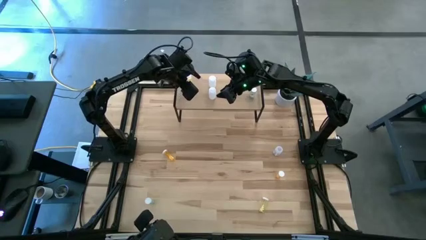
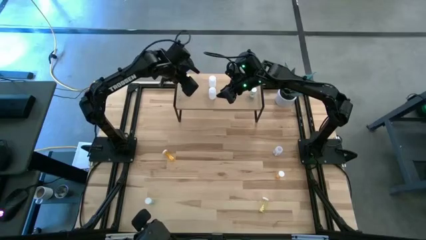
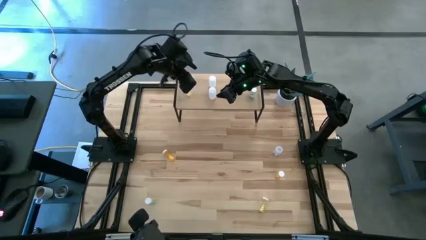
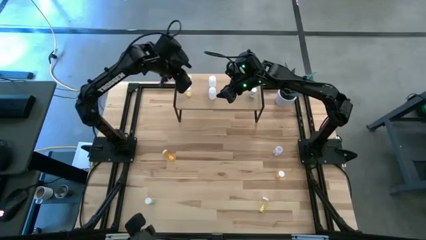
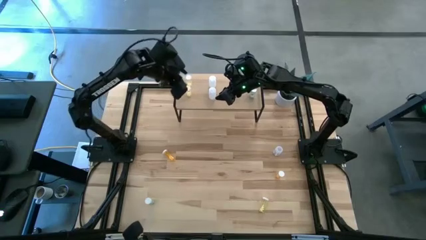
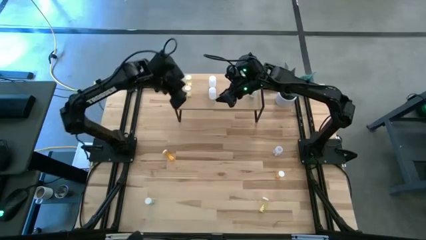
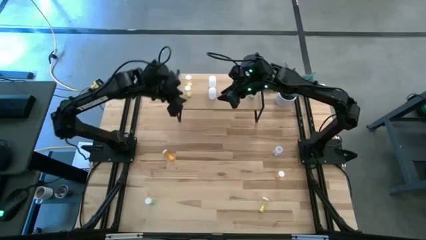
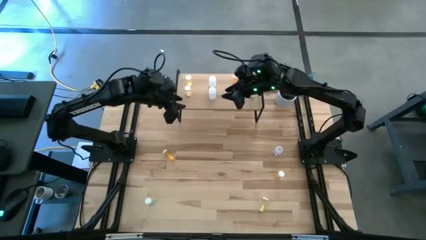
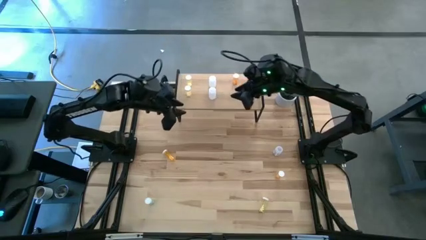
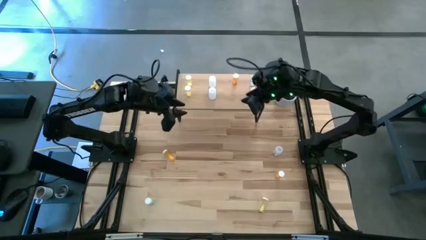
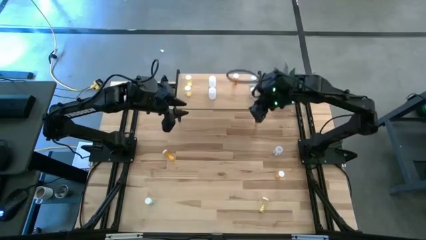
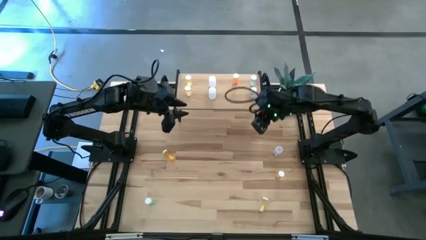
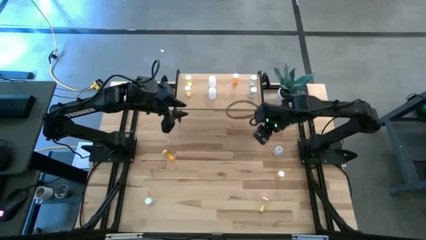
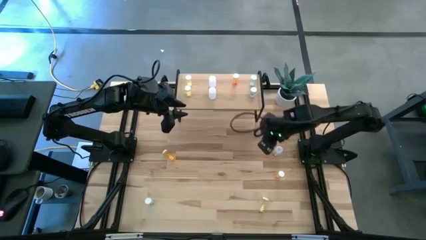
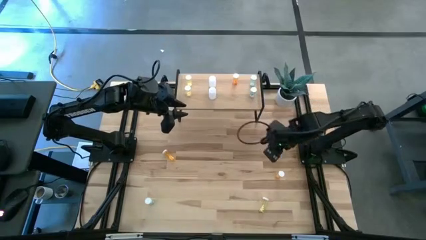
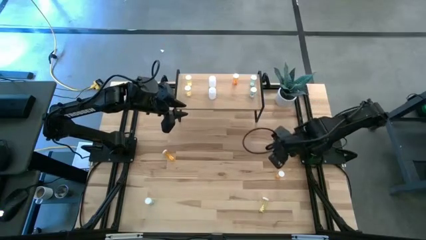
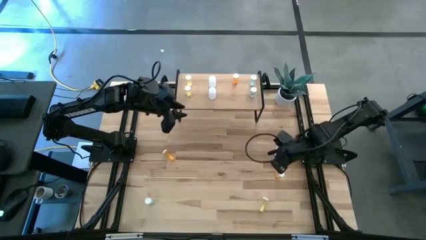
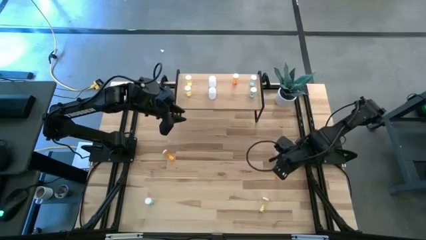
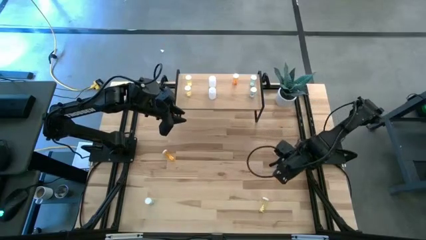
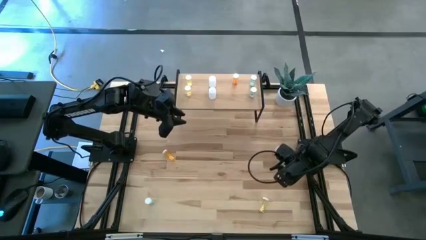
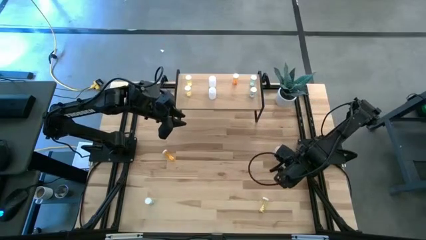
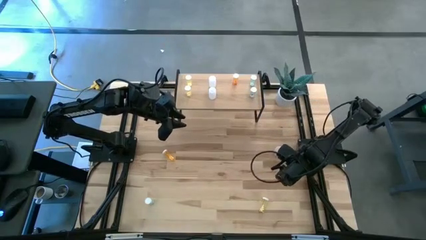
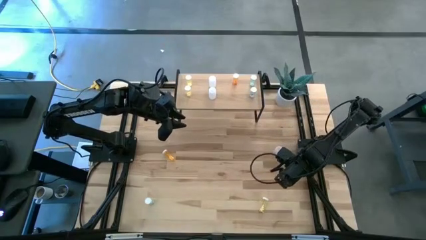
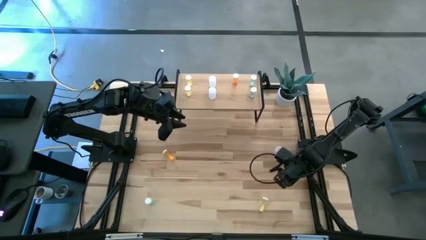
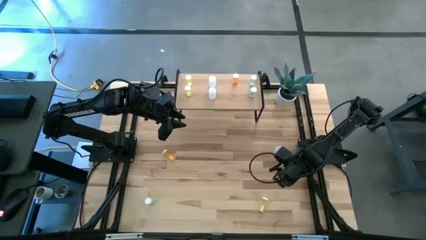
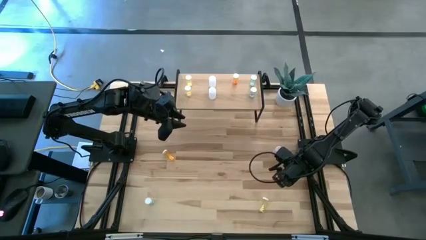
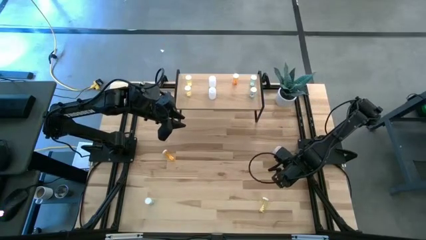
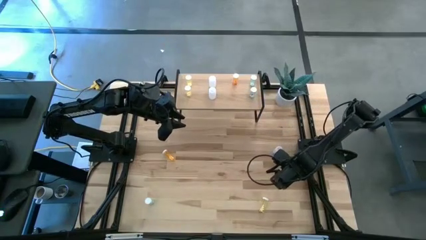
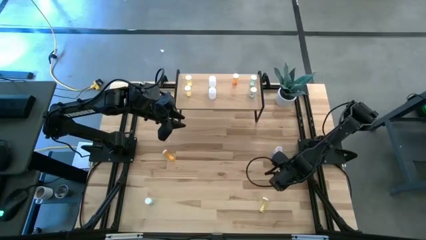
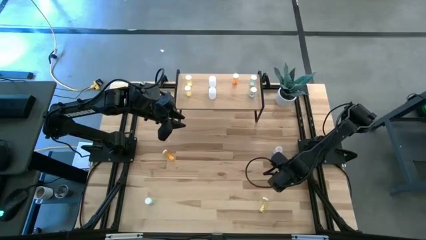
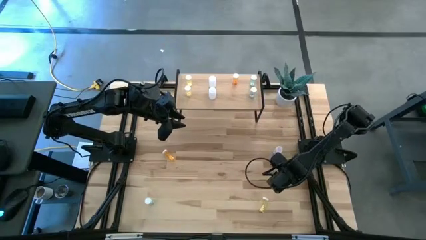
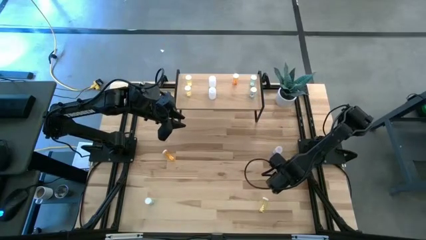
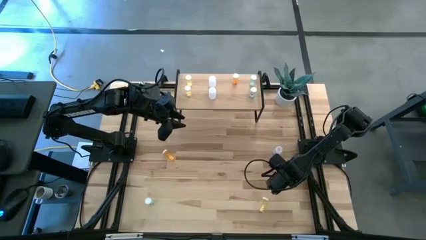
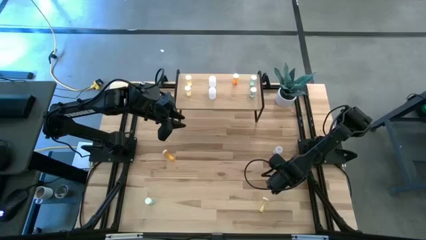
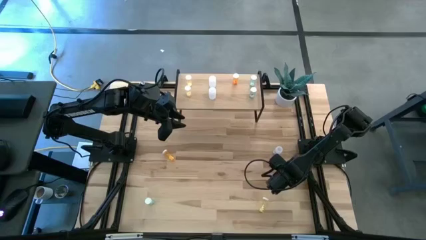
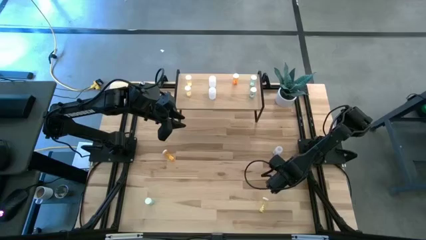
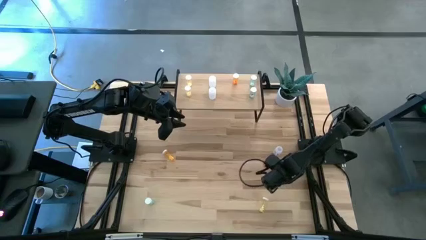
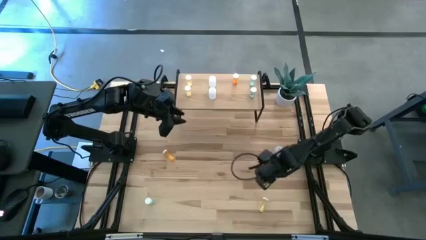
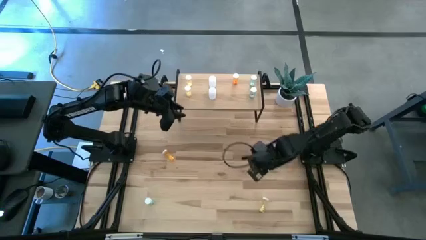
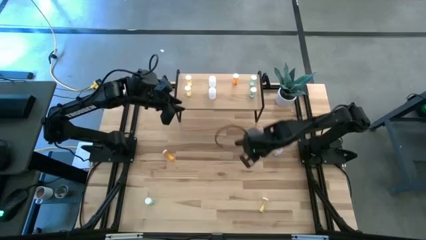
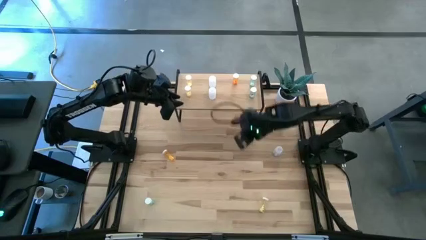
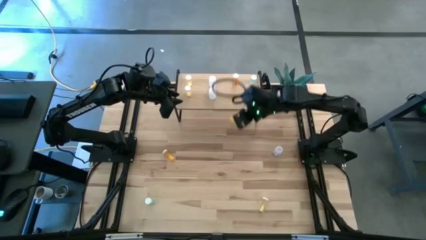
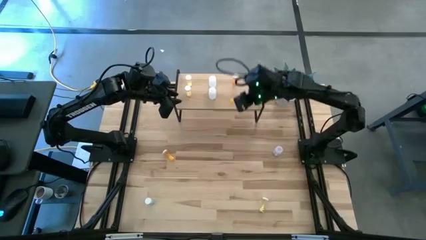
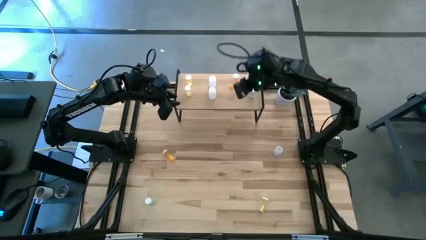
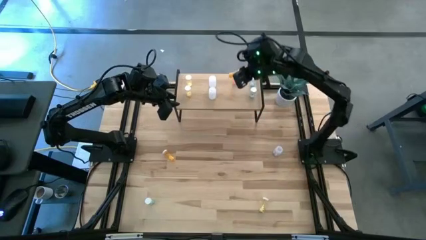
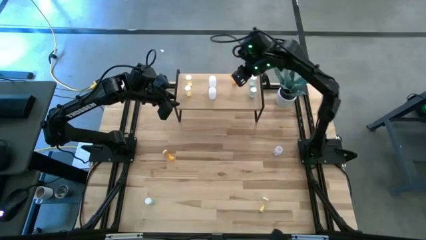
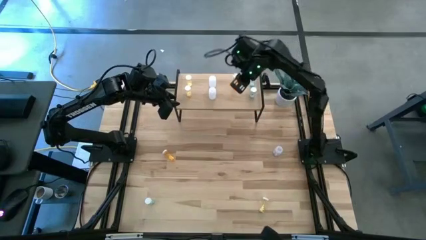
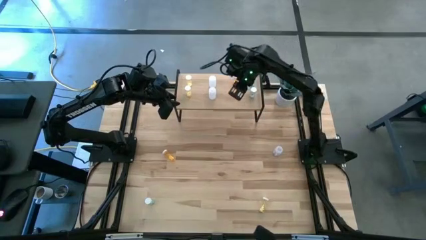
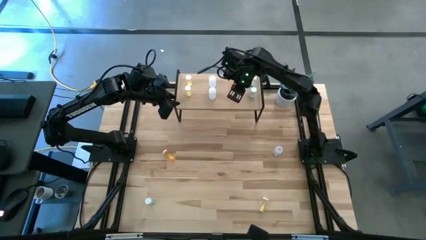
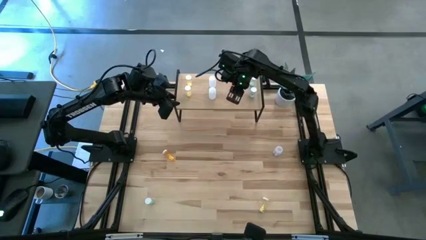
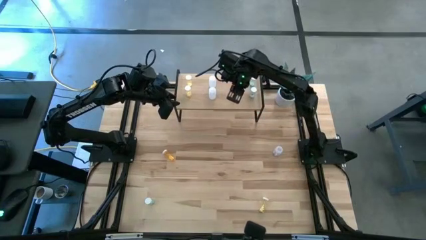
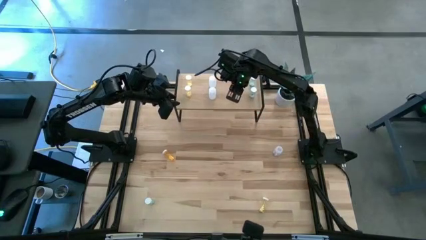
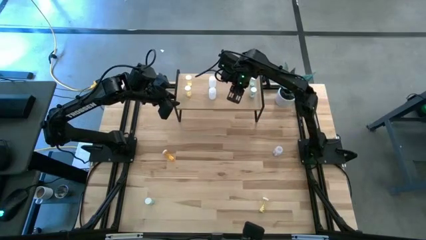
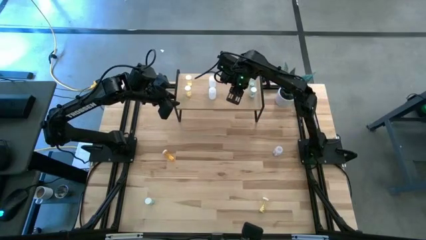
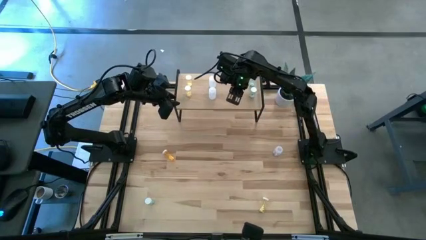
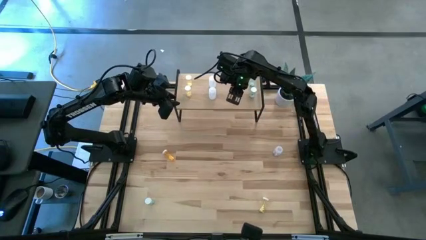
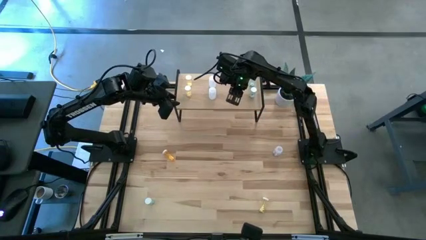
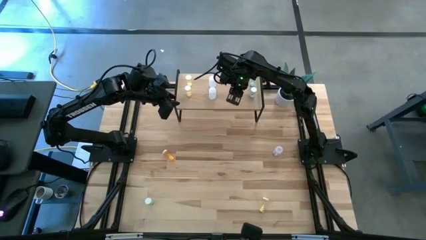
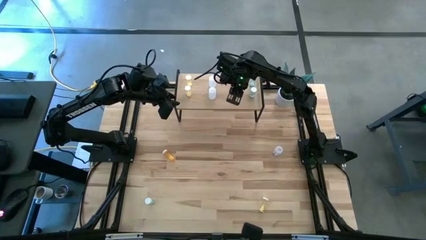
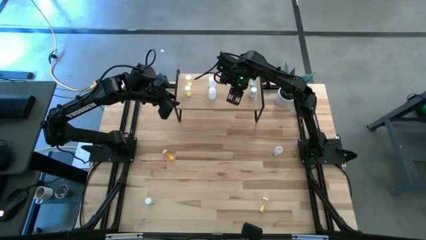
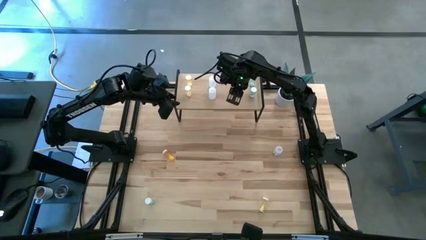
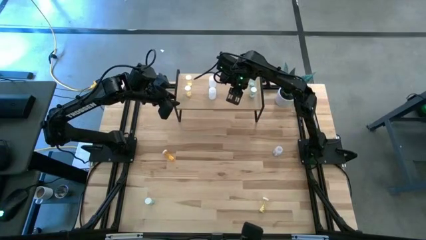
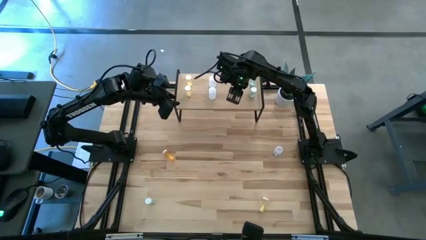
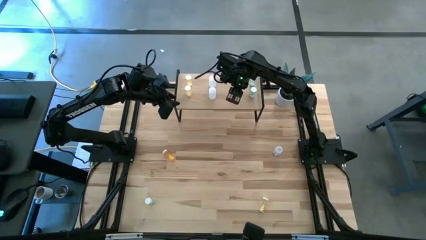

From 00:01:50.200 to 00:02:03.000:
Task: Pick and place medicine bottles onto shelf by color
Put the right orange medicine bottle on the shelf aligned with the other orange medicine bottle

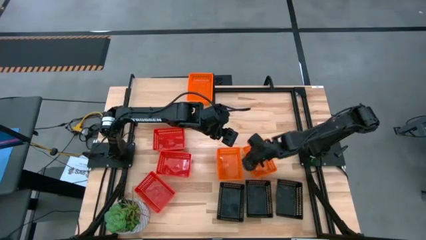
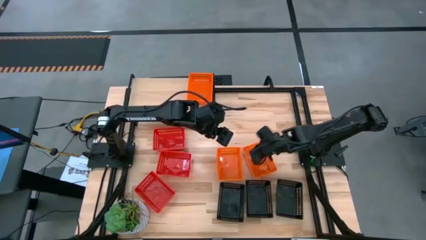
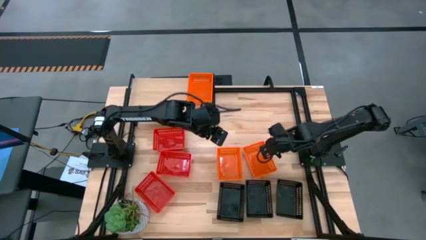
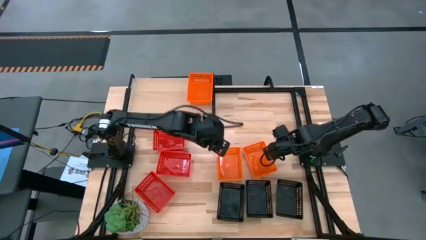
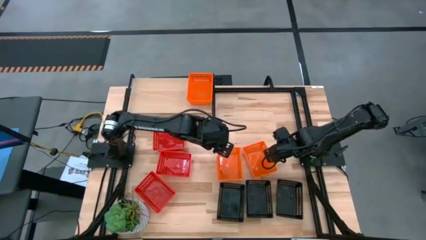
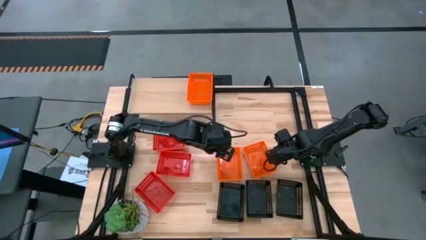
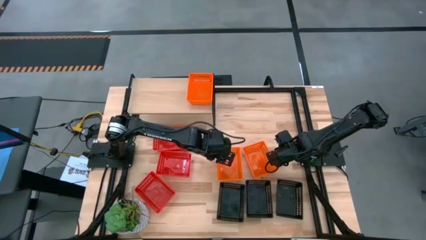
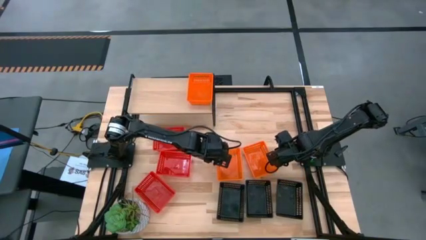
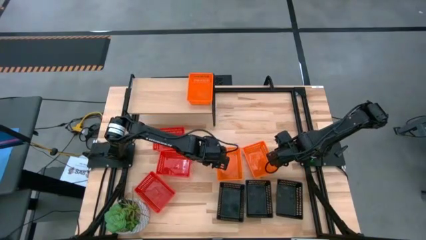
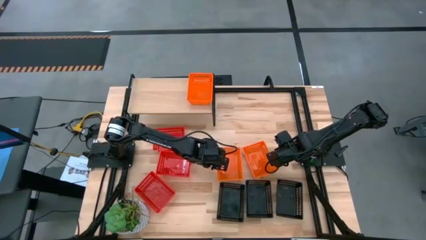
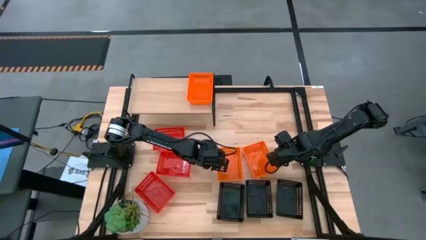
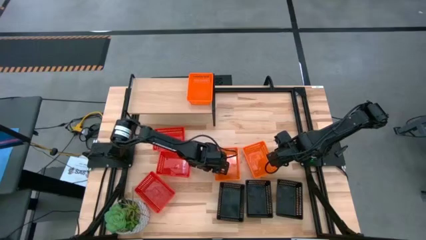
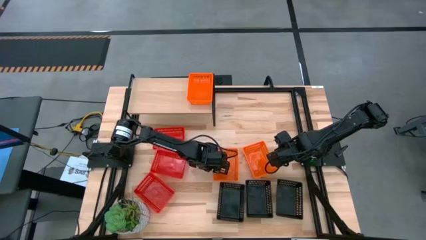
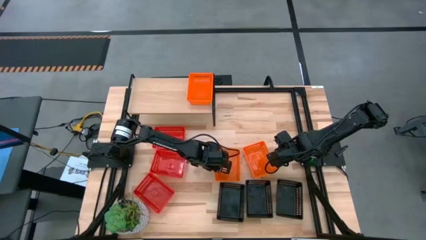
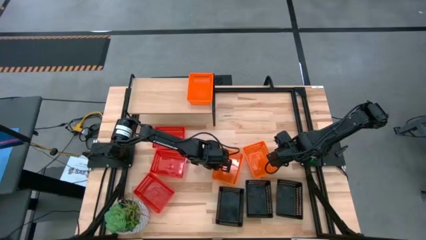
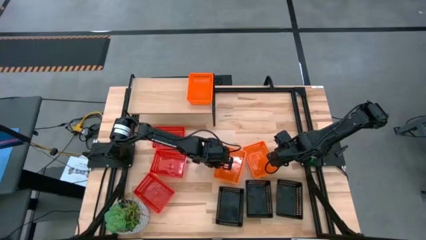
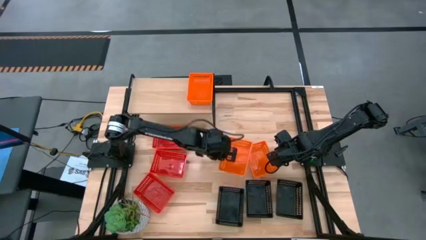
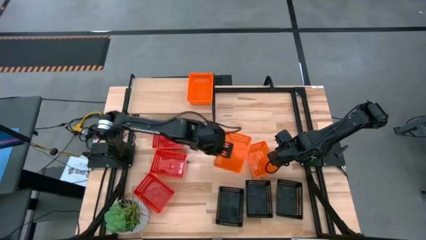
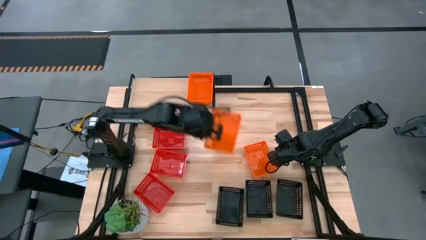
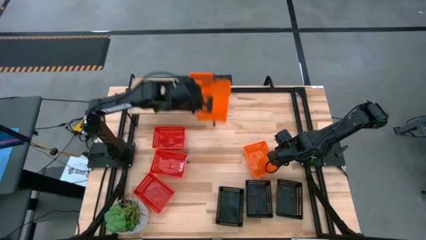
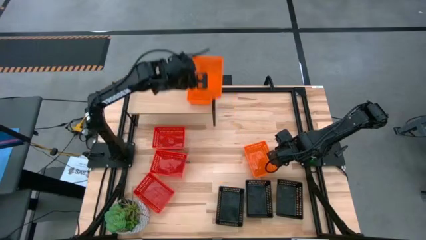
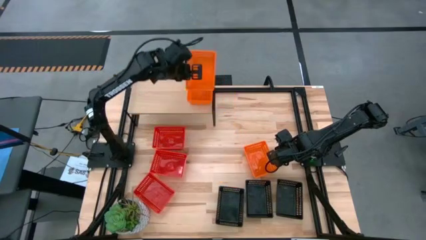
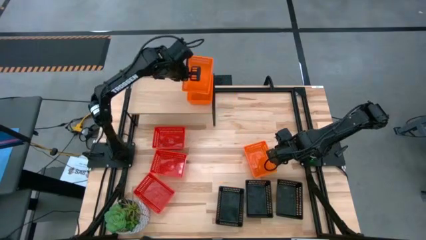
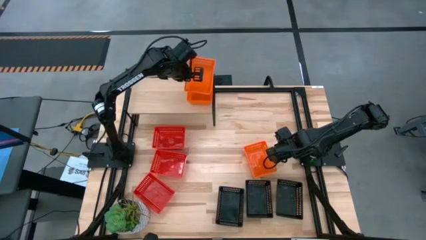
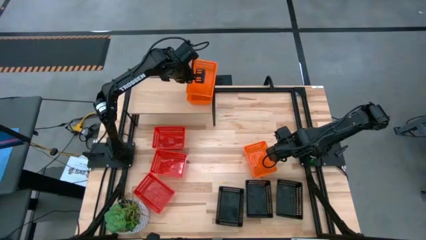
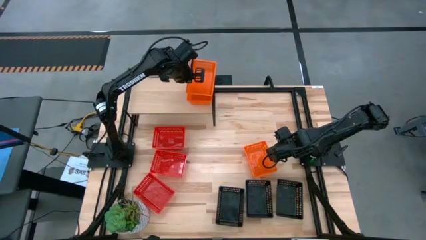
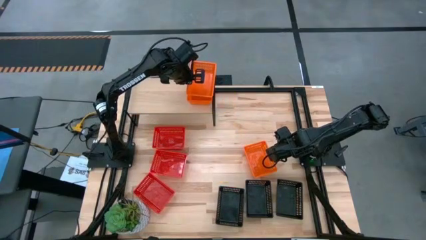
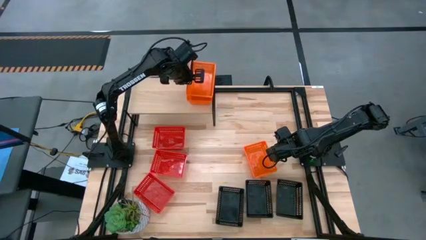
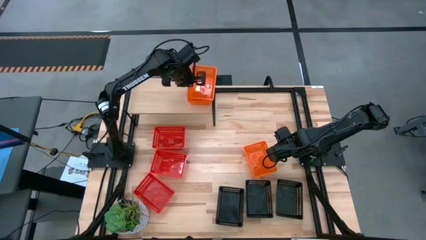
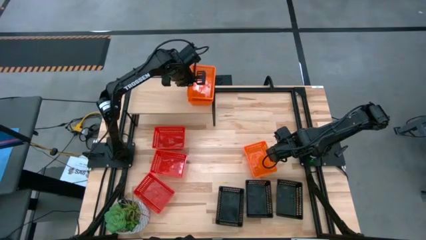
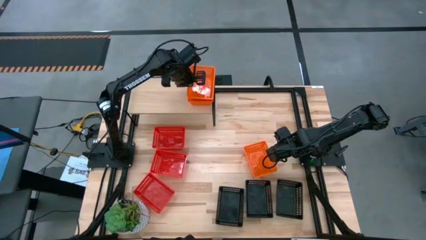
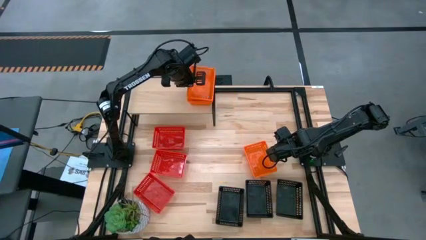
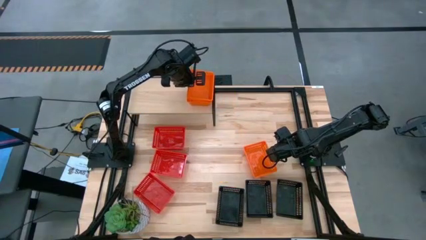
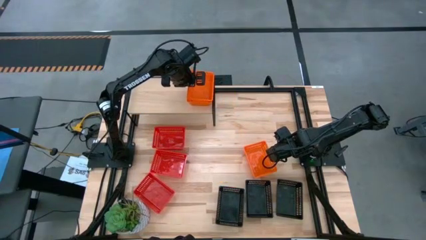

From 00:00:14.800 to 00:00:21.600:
Task: Stack baskets on shelf by color
Stack the left orange bin on top of the other orange bin on the shelf
